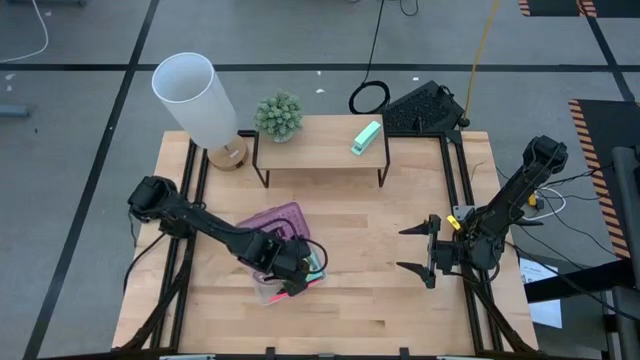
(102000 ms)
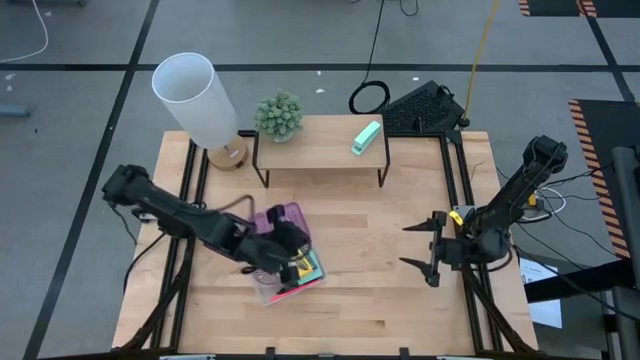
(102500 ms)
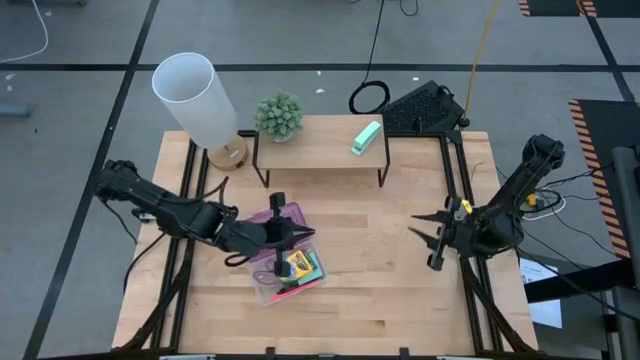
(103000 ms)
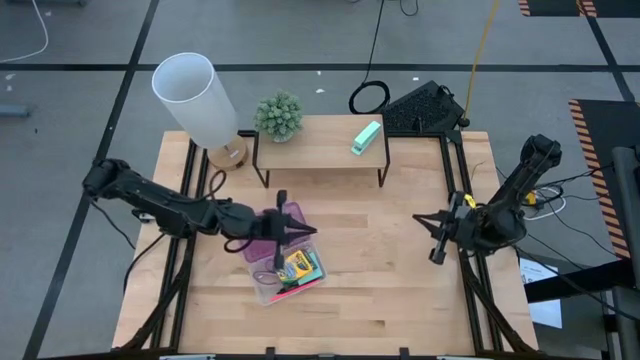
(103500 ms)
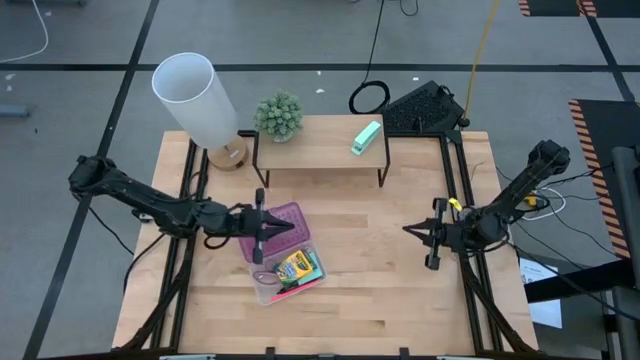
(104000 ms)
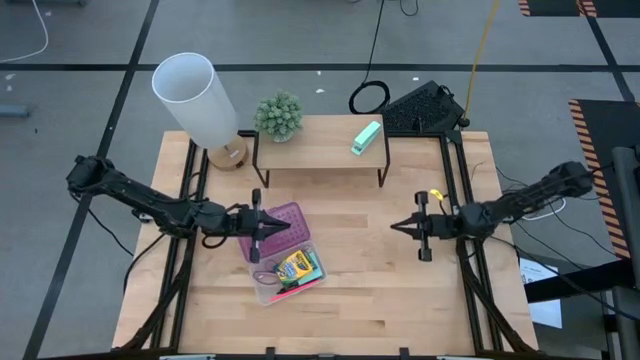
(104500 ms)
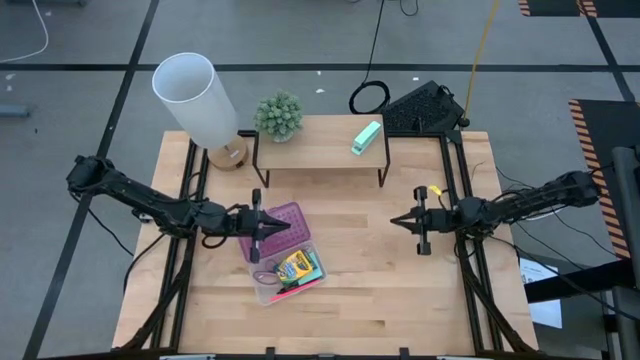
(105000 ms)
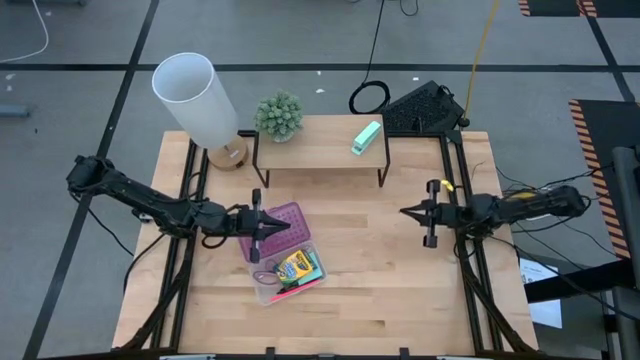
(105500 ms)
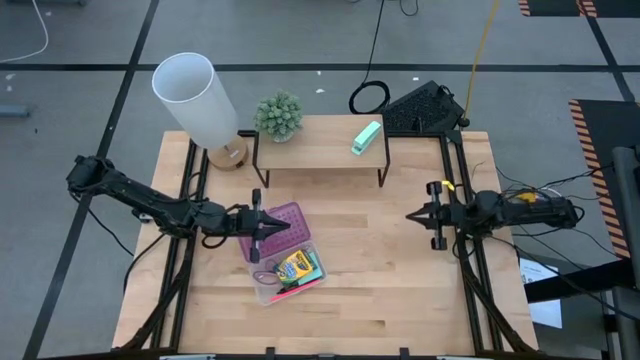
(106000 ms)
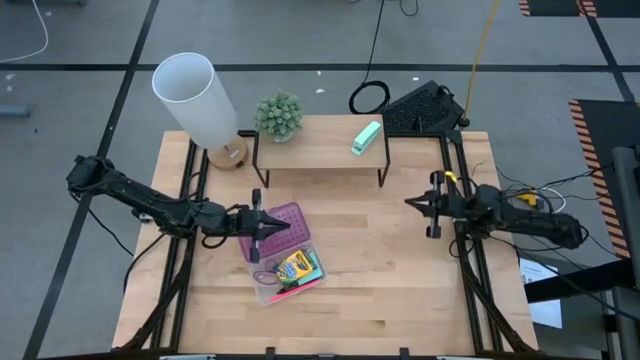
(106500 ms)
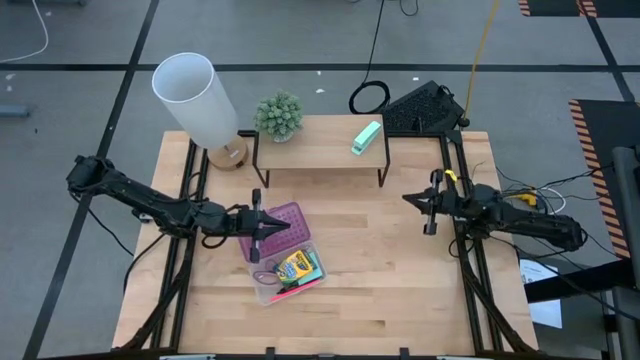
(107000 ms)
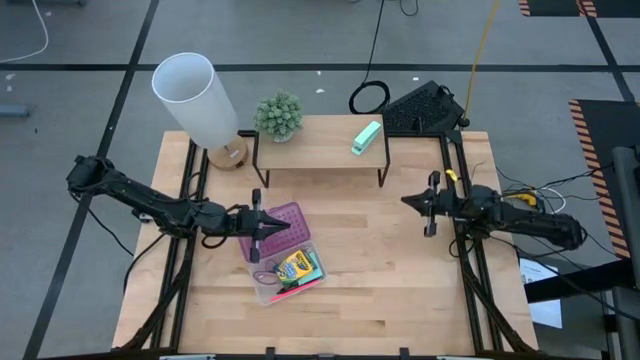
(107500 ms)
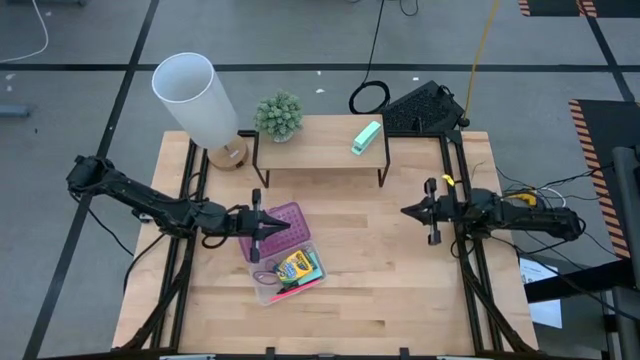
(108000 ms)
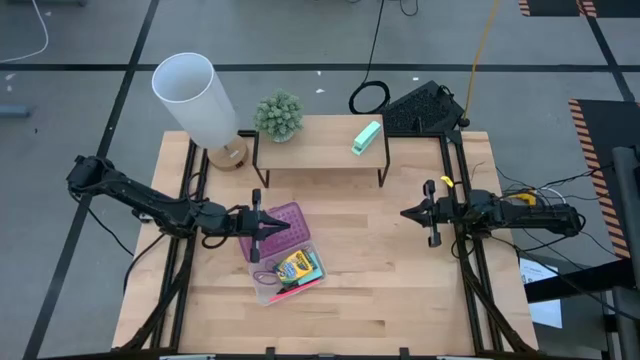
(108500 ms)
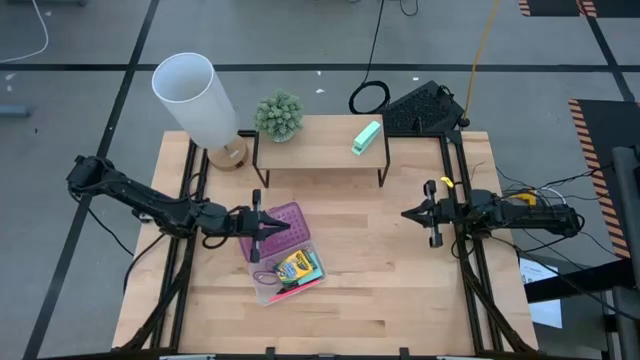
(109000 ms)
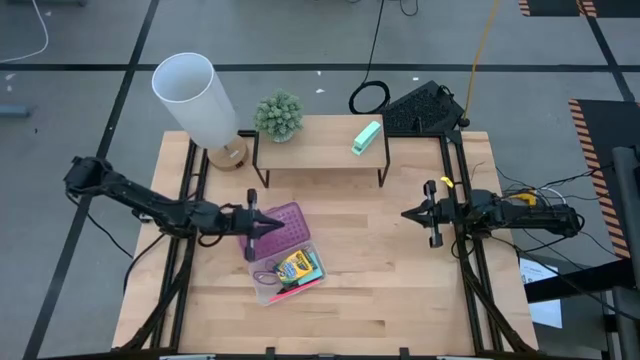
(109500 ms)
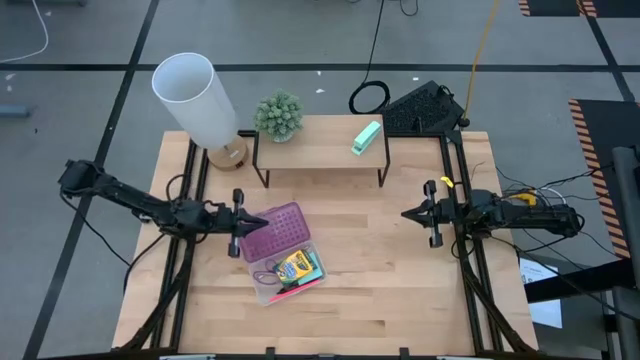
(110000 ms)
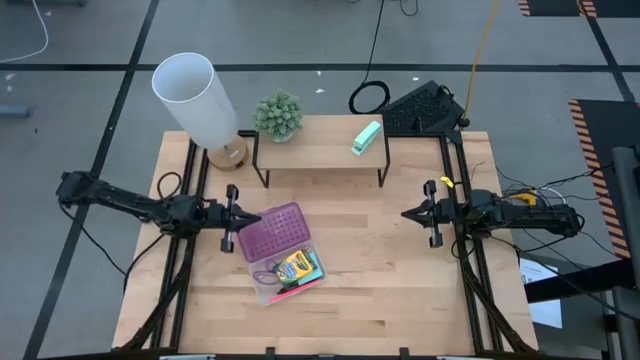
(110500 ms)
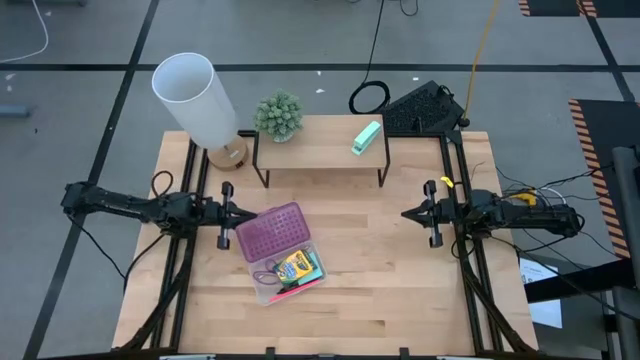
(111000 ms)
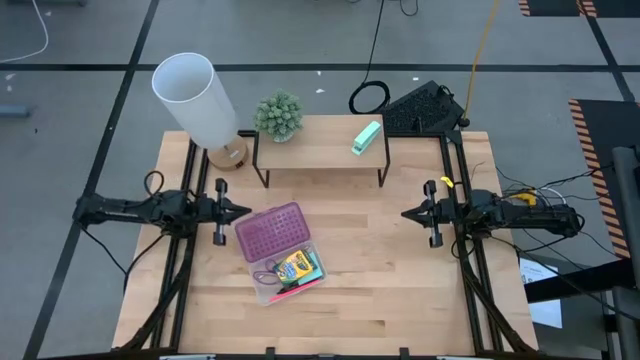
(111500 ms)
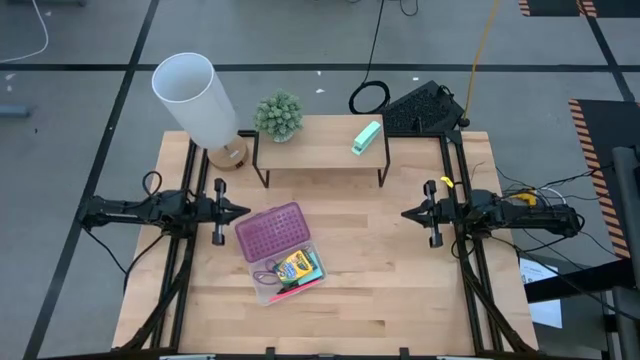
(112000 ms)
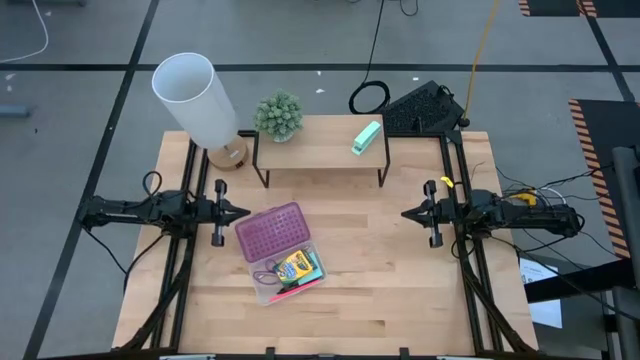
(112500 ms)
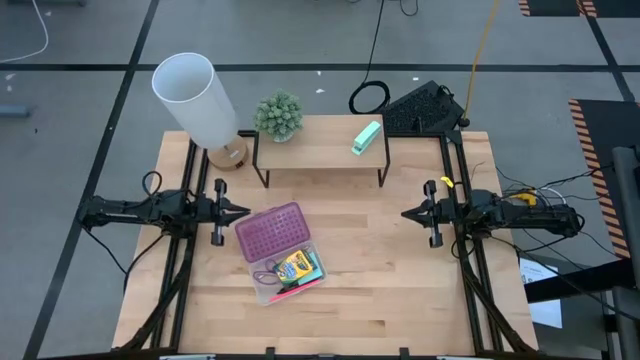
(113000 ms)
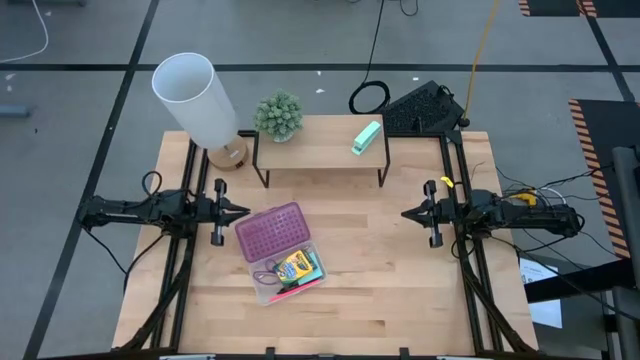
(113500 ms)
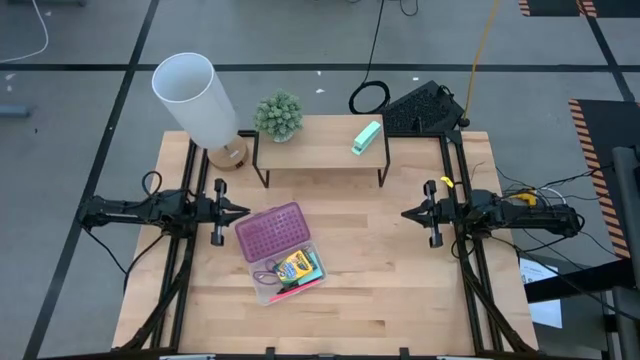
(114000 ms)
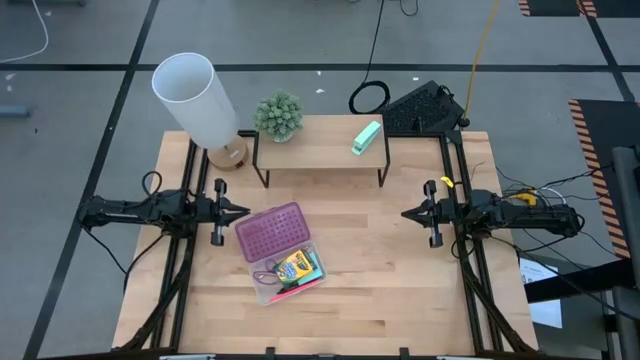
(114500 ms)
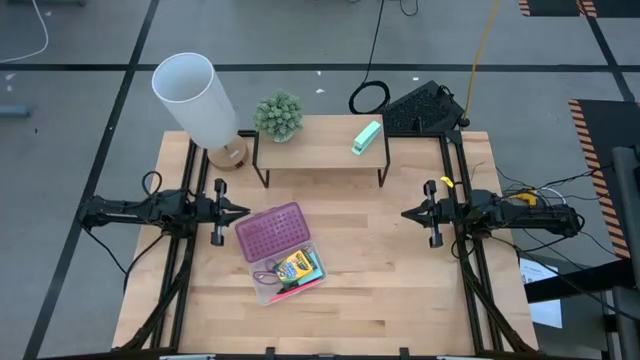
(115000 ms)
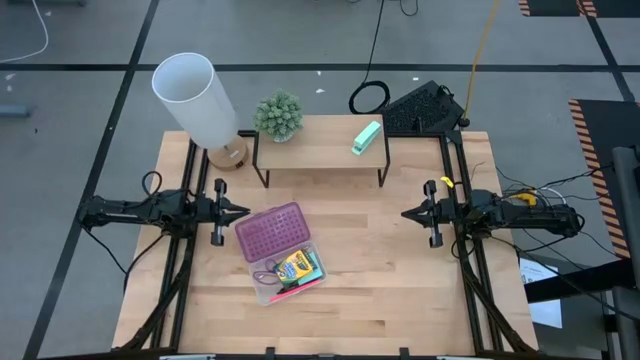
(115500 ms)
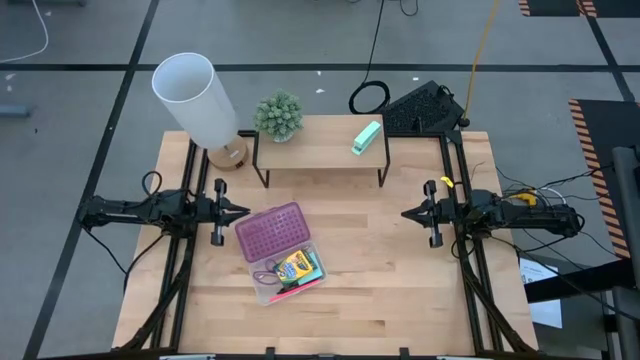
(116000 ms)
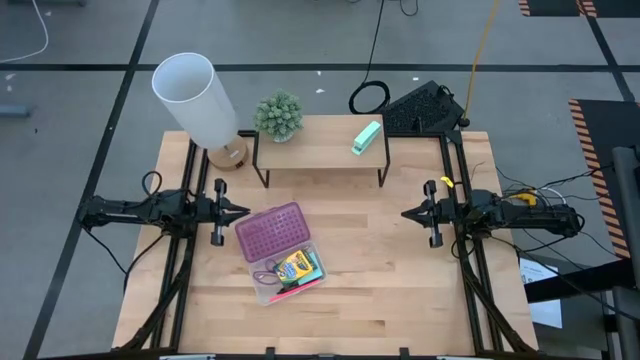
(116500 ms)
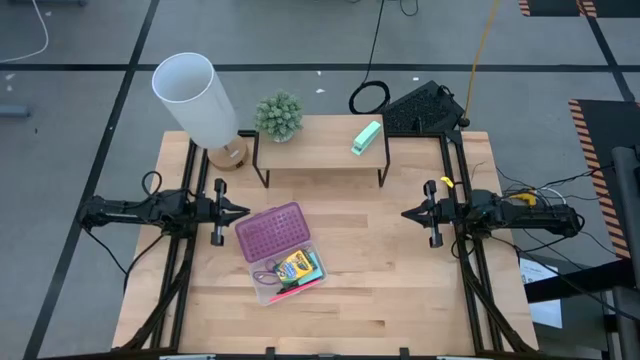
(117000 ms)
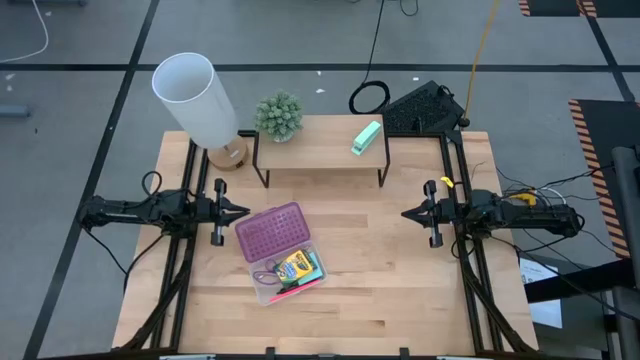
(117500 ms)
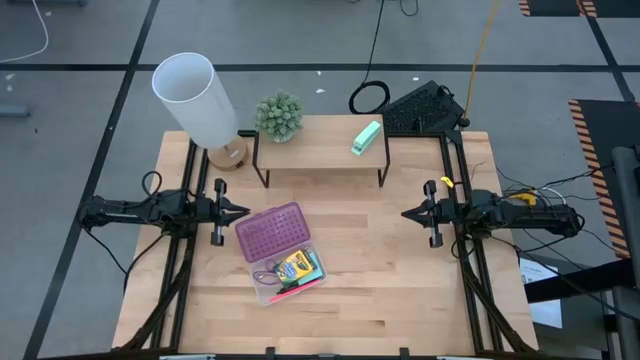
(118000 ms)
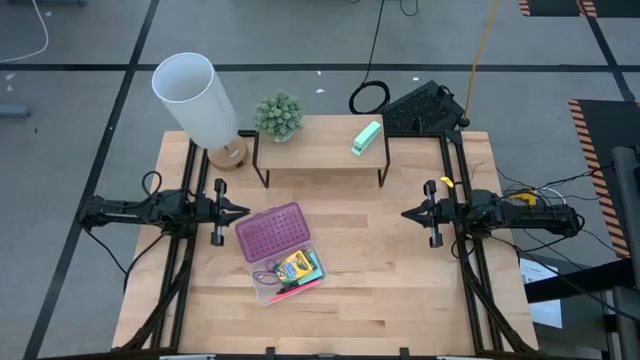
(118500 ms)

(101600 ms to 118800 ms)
Task: Pack school essentials
Return to home position

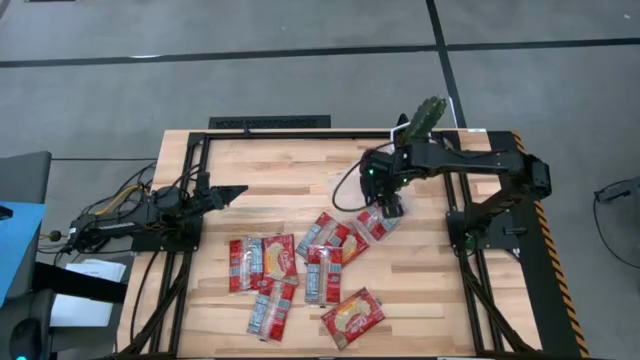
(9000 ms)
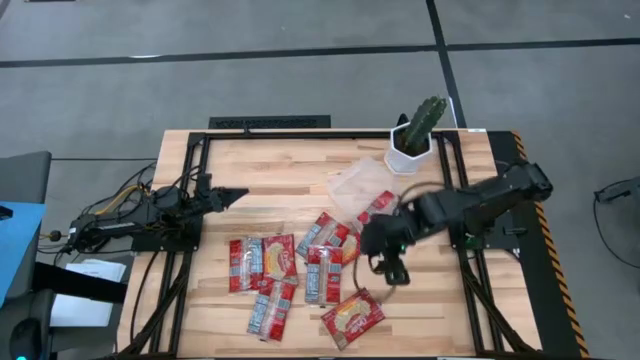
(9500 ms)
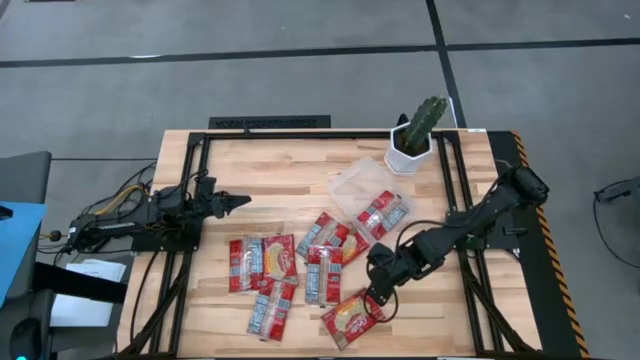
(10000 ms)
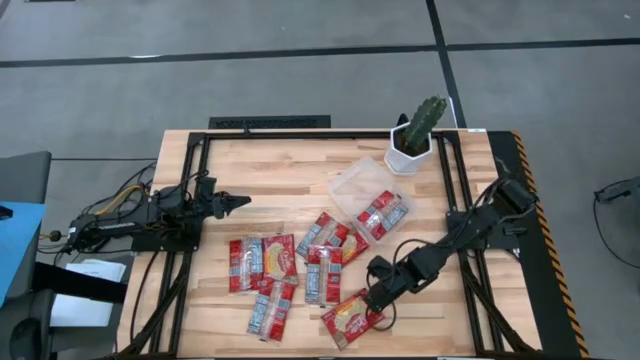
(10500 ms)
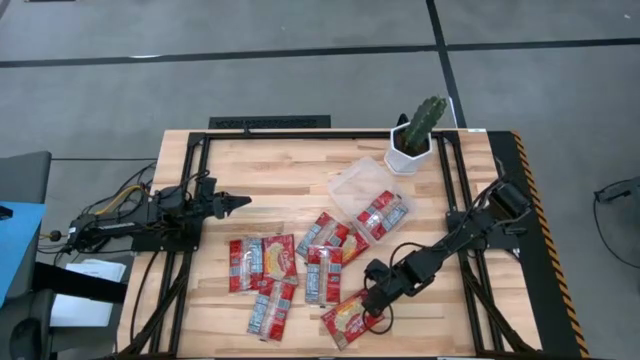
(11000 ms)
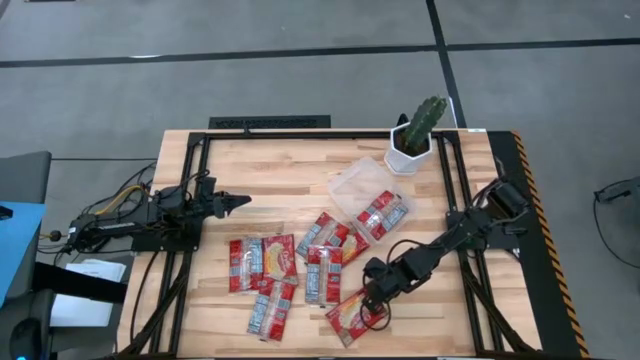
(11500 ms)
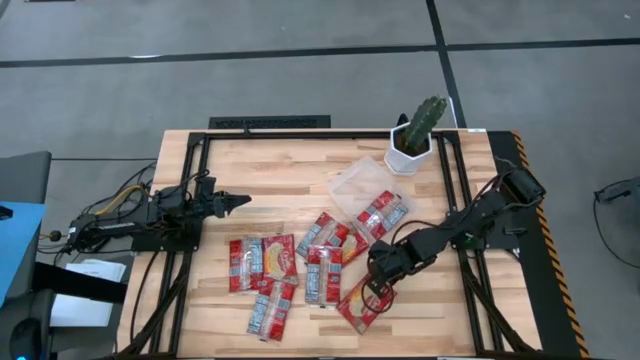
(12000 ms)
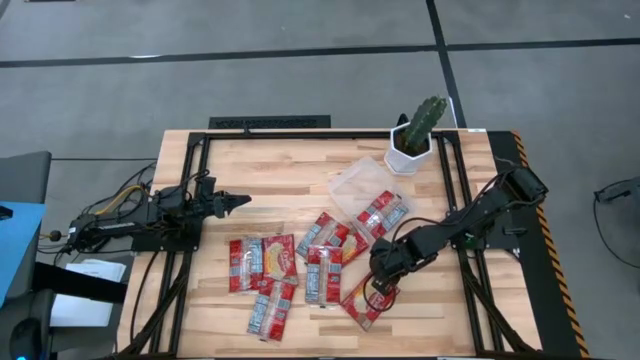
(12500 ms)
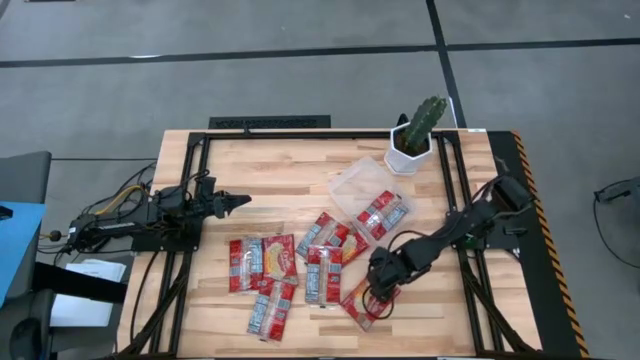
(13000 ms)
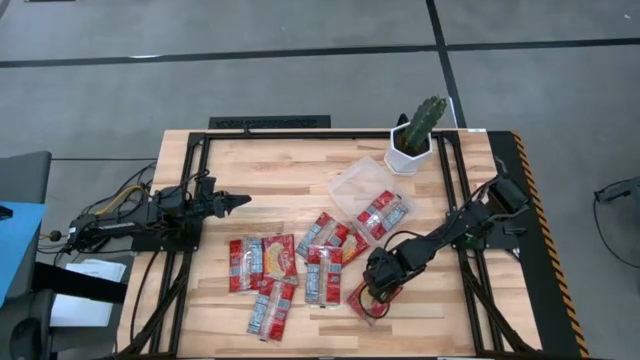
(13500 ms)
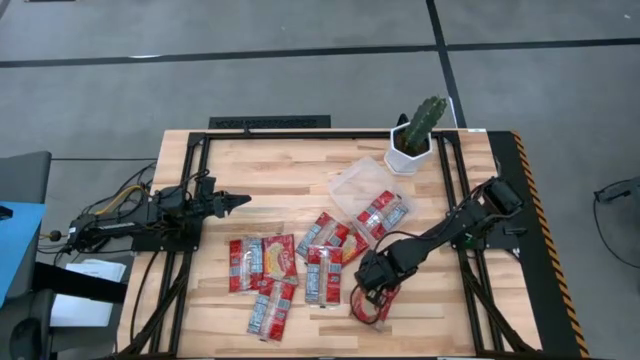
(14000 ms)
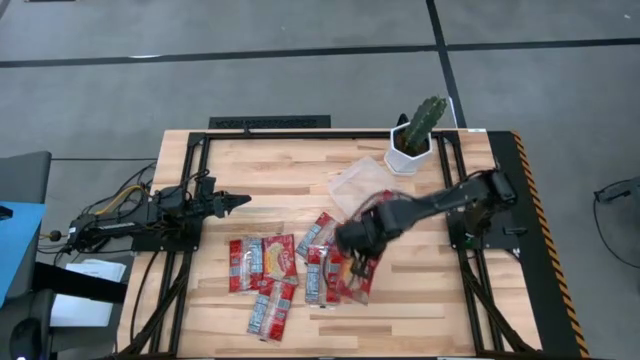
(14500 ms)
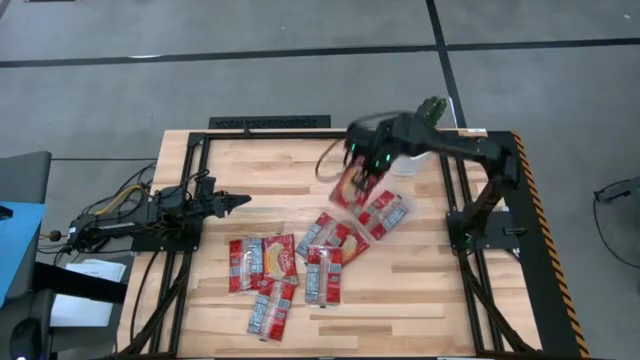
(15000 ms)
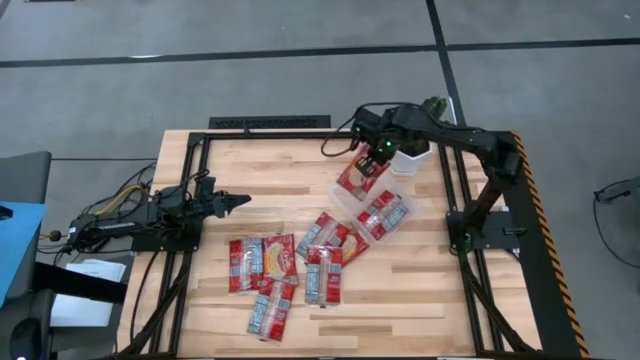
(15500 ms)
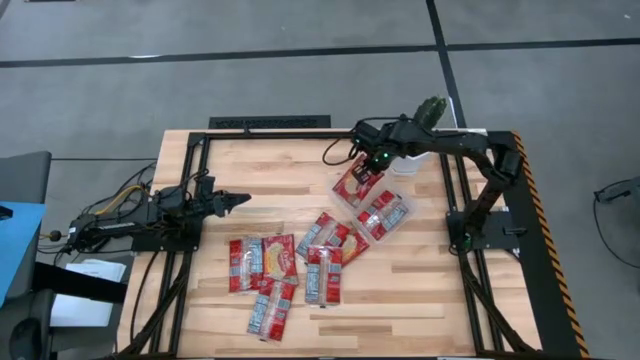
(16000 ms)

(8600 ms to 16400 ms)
Task: Sort popcorn bags into baskets
Put the red popcorn pack into the transparent bin
